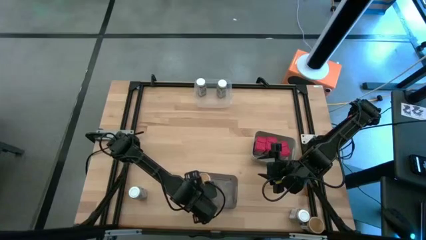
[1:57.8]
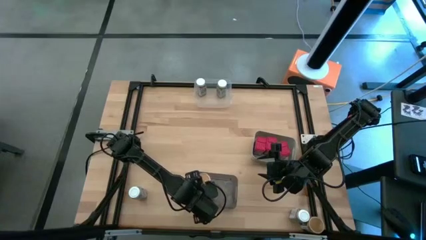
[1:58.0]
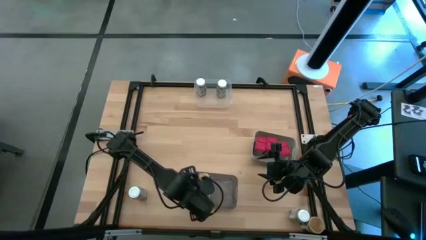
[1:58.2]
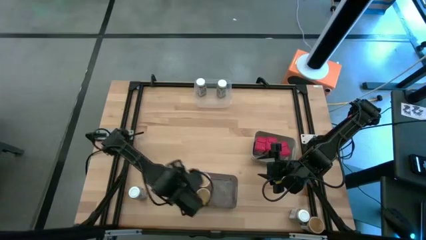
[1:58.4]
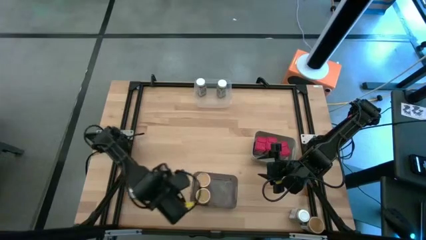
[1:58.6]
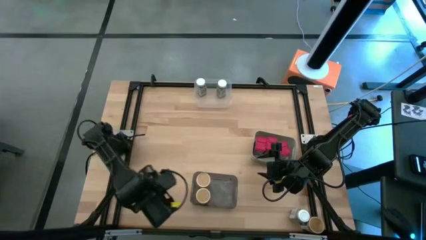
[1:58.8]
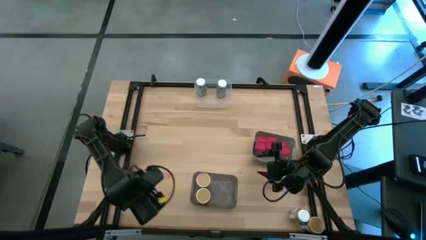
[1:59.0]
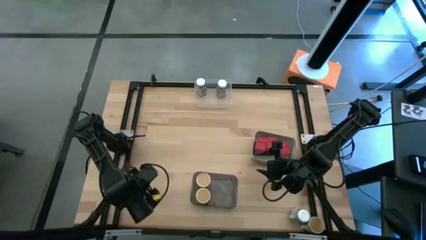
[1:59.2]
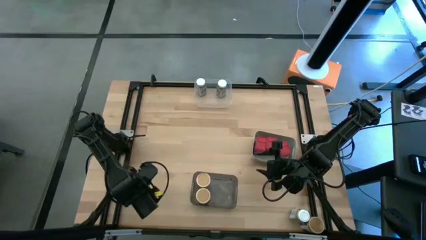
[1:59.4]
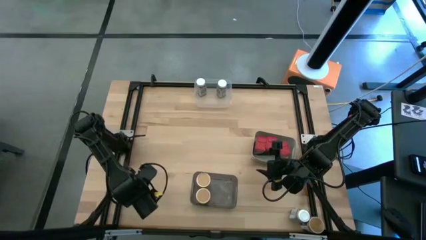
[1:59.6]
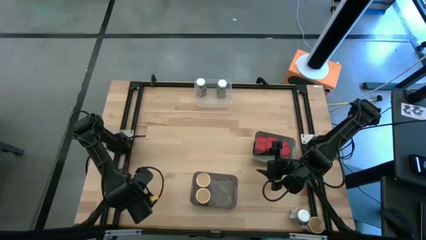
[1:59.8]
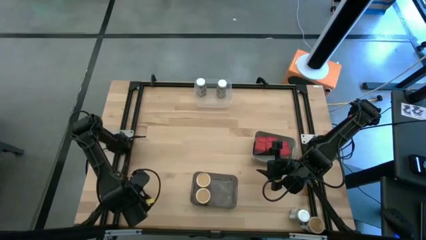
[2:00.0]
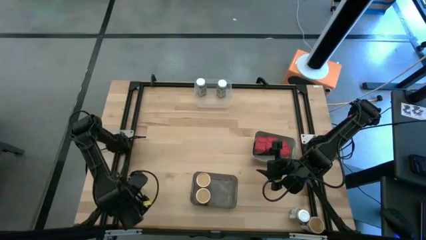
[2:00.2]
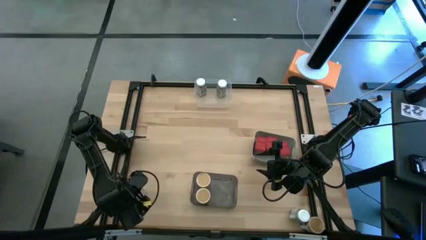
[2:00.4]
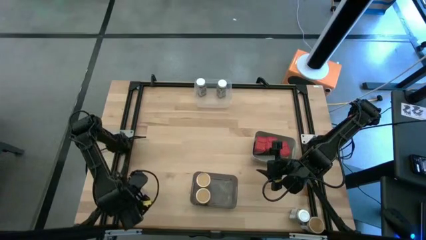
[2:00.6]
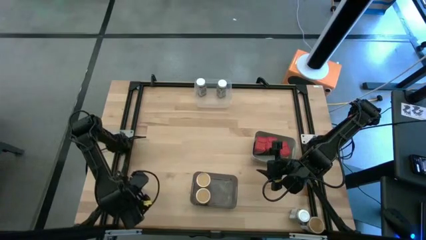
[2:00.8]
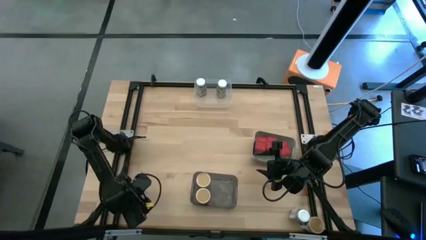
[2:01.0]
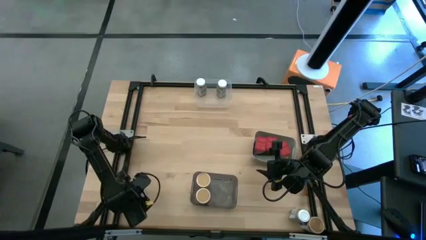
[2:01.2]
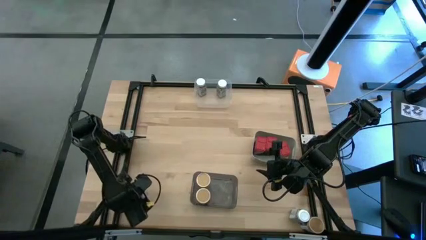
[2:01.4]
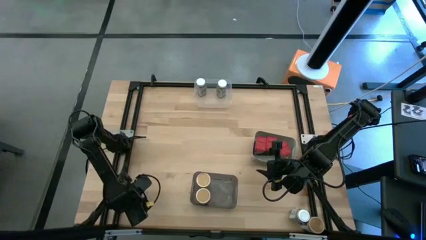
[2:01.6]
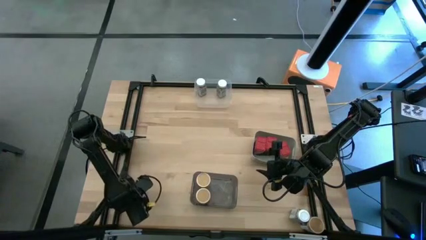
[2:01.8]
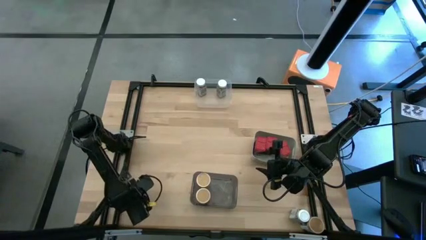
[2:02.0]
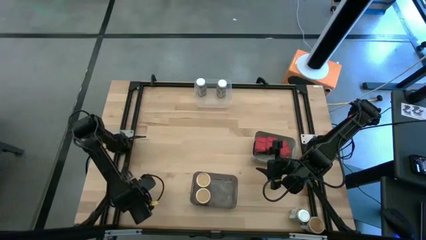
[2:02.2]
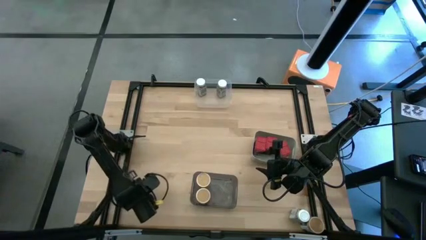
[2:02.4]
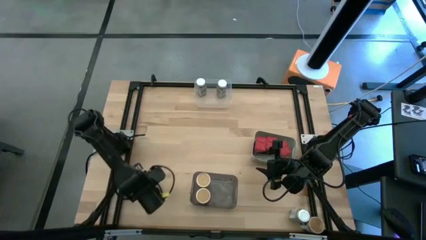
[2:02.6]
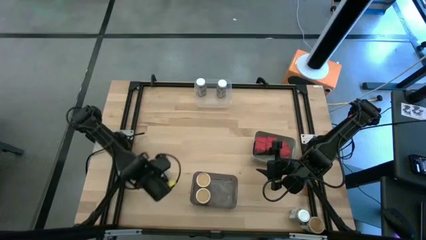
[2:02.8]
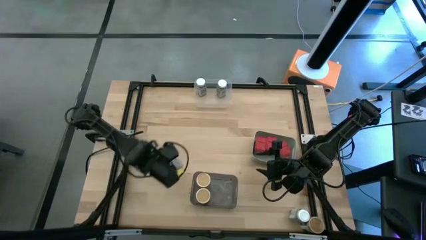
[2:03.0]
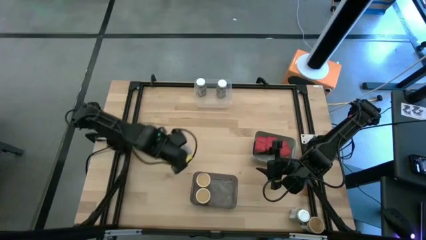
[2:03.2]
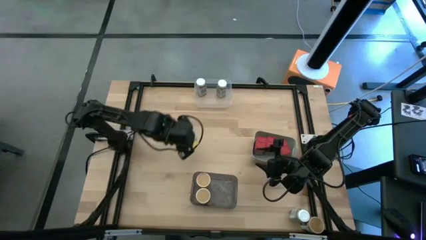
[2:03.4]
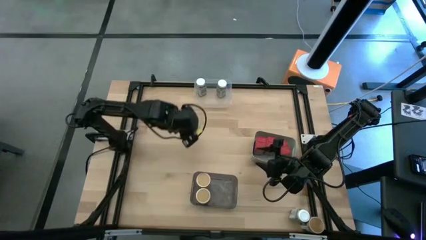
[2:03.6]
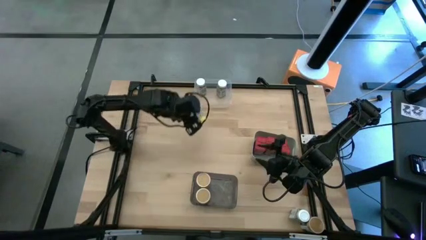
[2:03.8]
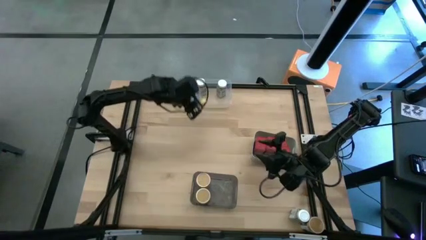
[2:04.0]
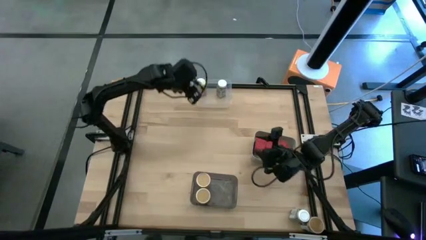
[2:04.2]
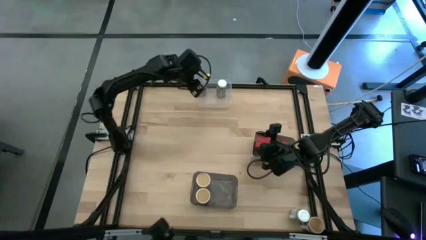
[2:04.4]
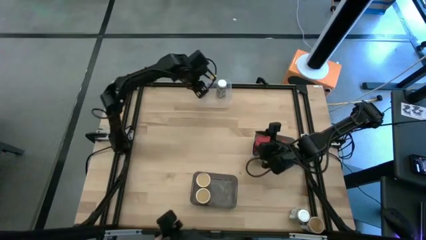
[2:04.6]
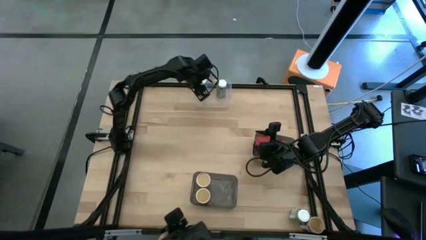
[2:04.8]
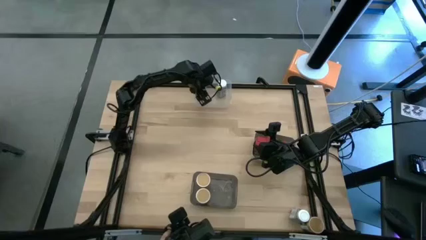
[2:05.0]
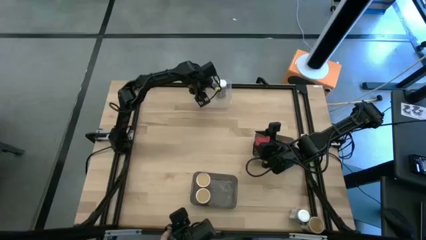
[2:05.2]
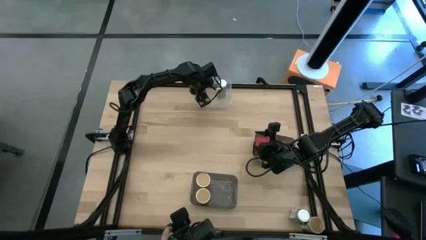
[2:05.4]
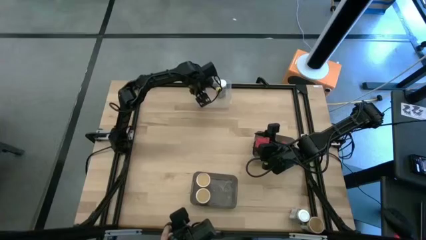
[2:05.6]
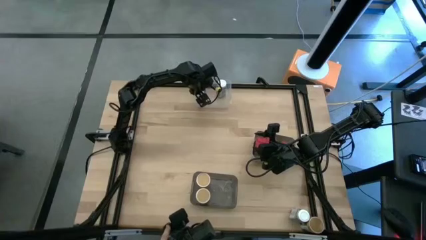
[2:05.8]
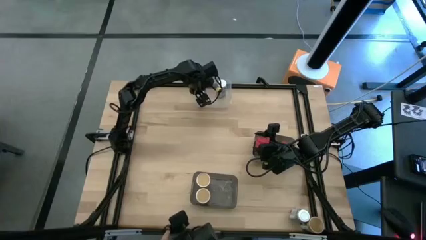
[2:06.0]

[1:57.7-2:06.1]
Task: Sort spices by type
Put the white seasoning bottle into the transparent bin

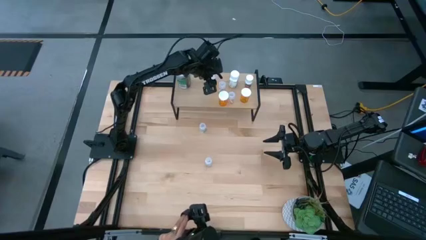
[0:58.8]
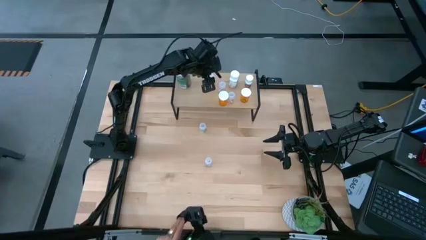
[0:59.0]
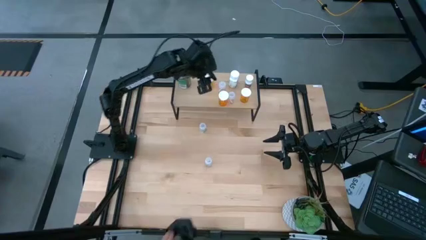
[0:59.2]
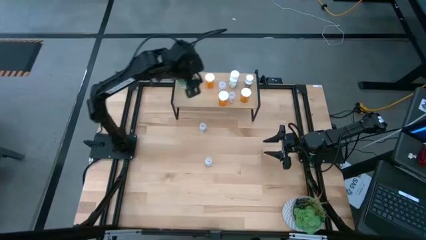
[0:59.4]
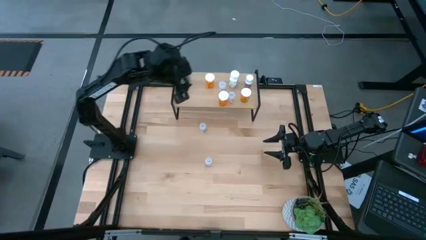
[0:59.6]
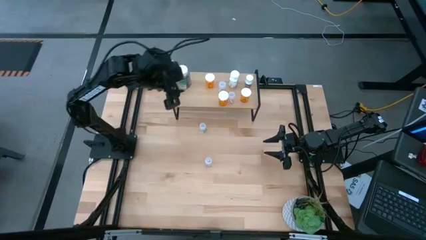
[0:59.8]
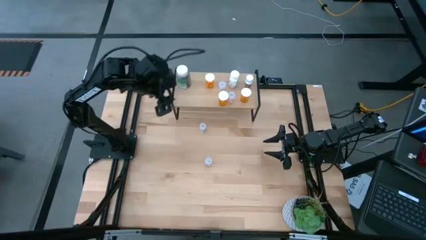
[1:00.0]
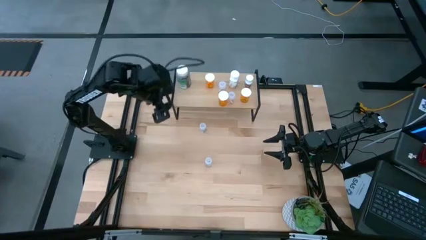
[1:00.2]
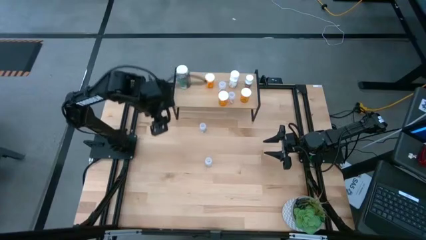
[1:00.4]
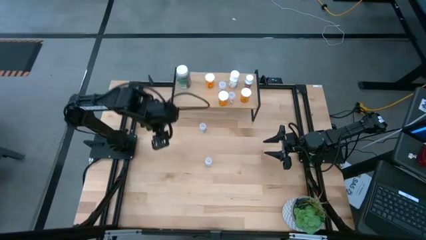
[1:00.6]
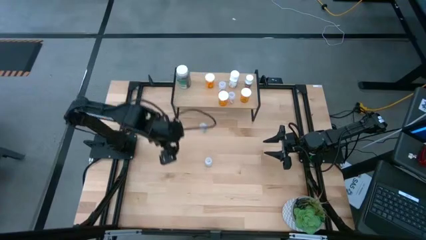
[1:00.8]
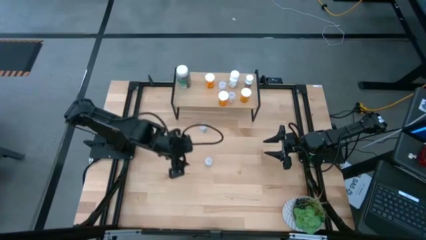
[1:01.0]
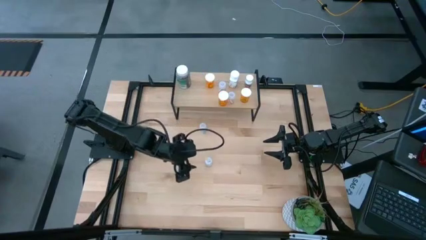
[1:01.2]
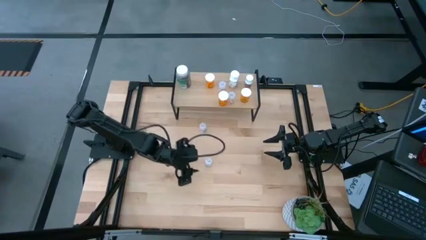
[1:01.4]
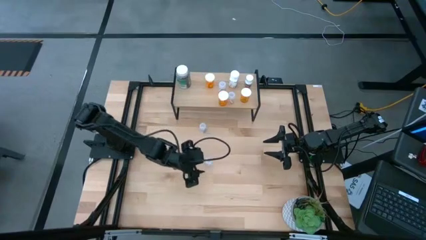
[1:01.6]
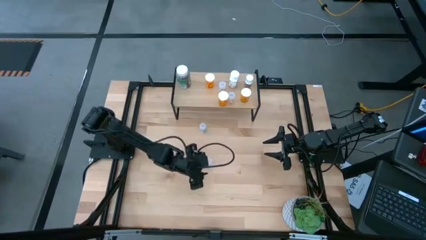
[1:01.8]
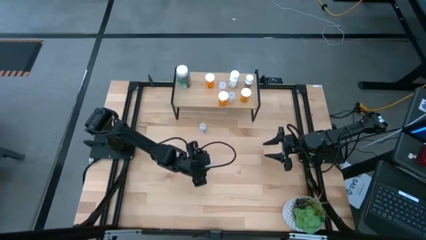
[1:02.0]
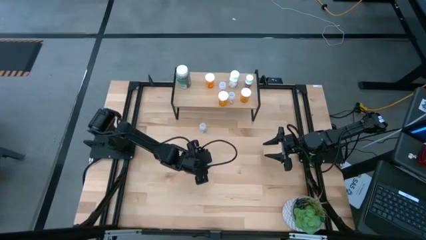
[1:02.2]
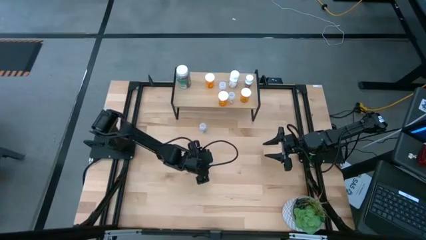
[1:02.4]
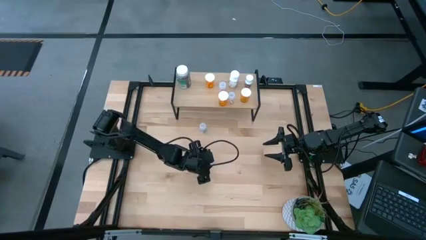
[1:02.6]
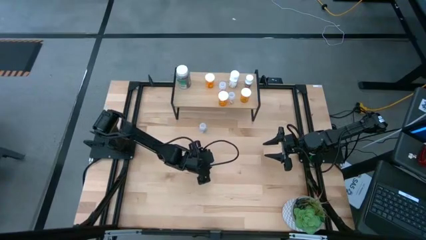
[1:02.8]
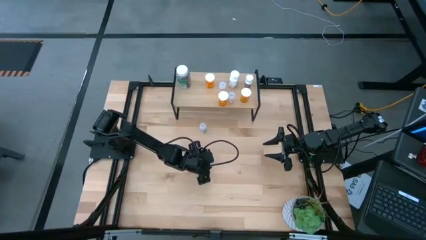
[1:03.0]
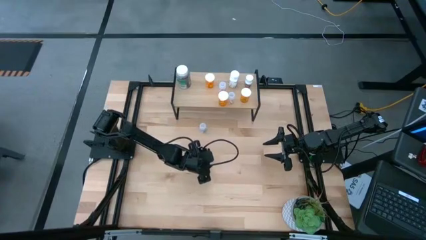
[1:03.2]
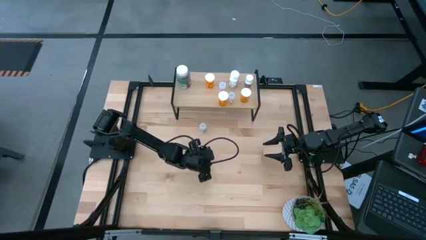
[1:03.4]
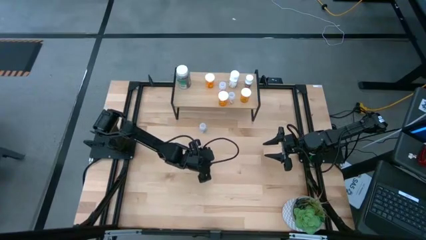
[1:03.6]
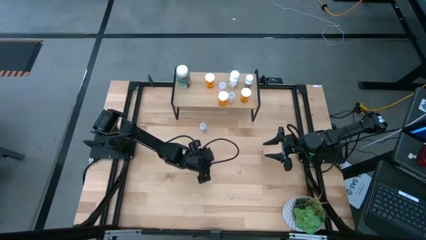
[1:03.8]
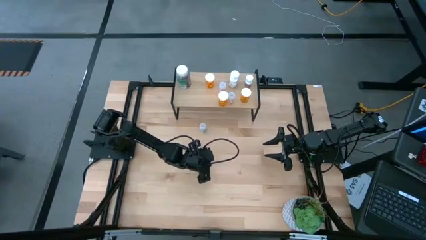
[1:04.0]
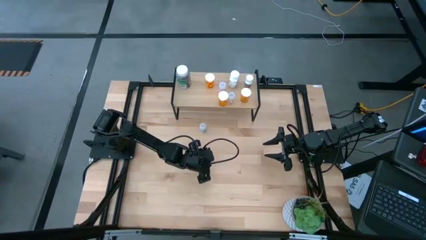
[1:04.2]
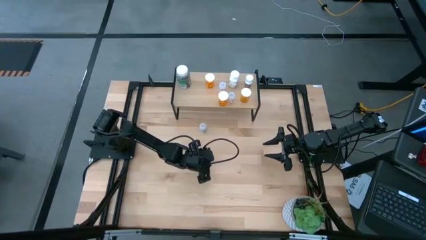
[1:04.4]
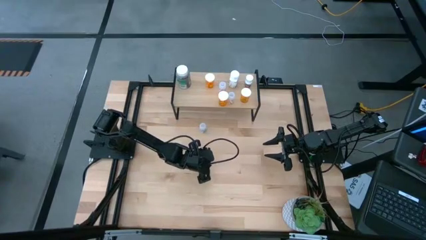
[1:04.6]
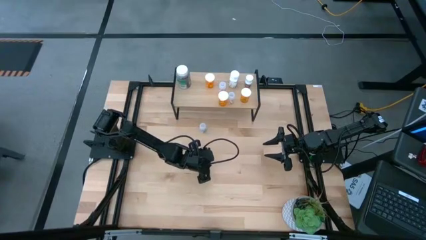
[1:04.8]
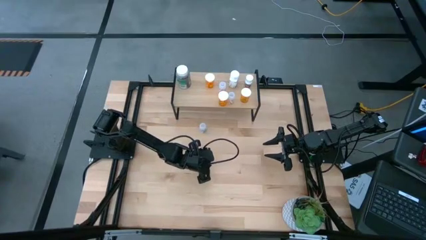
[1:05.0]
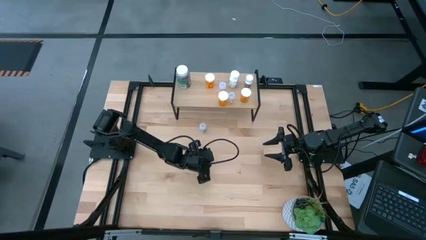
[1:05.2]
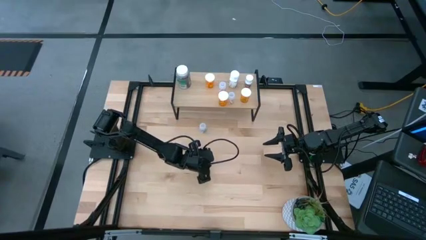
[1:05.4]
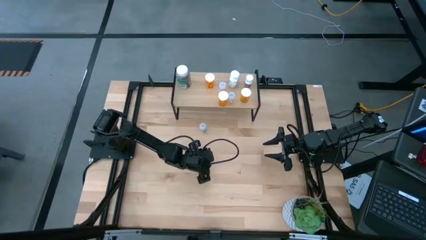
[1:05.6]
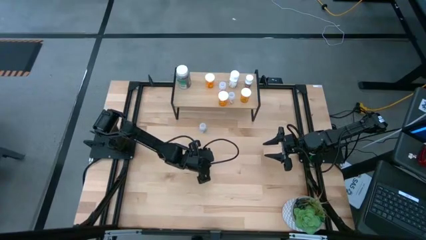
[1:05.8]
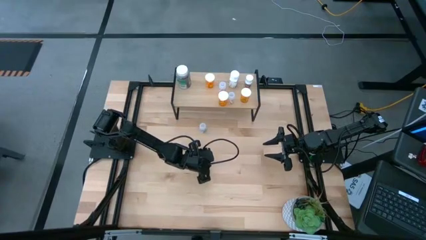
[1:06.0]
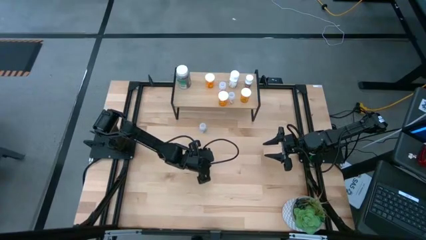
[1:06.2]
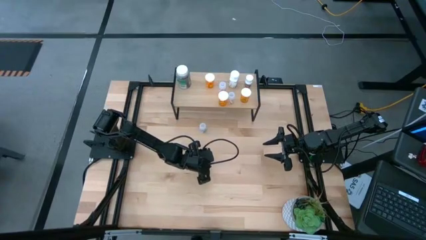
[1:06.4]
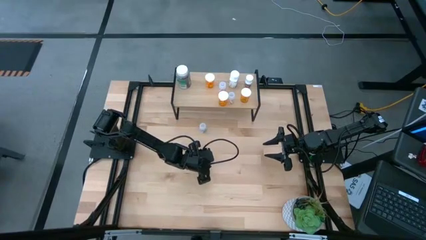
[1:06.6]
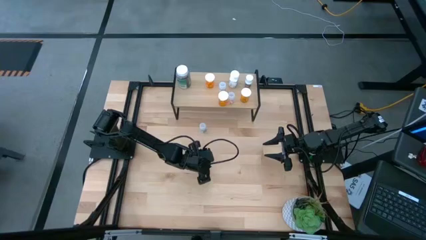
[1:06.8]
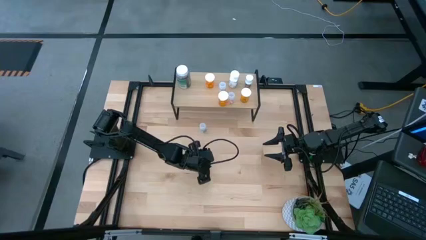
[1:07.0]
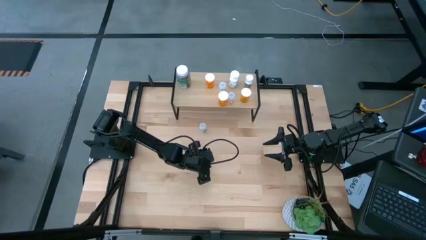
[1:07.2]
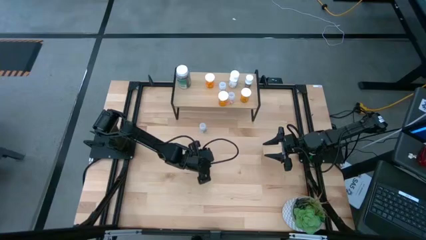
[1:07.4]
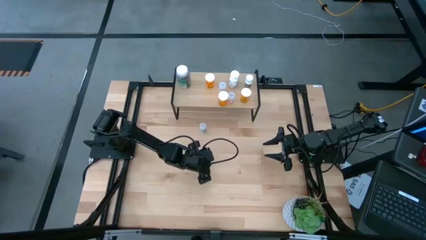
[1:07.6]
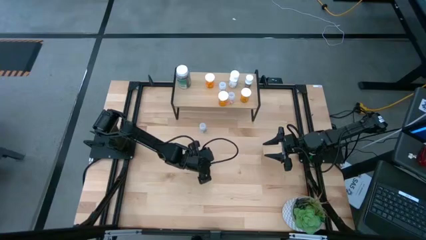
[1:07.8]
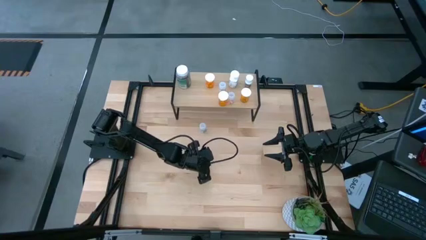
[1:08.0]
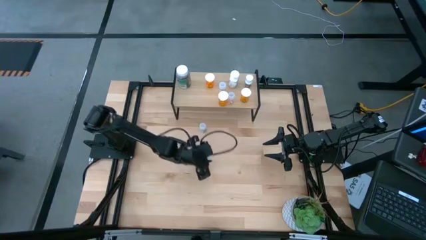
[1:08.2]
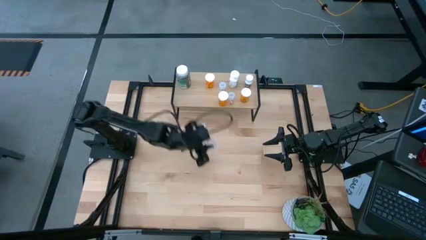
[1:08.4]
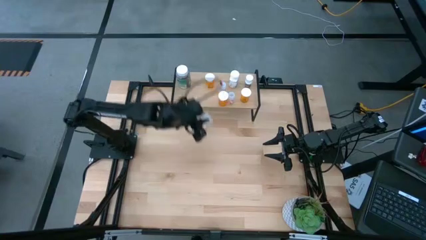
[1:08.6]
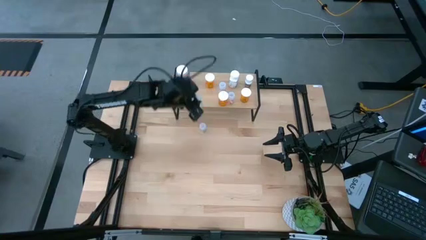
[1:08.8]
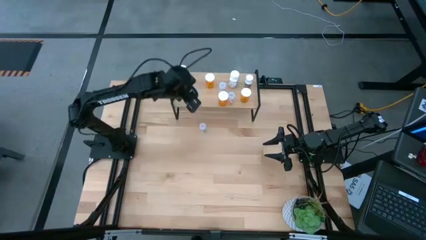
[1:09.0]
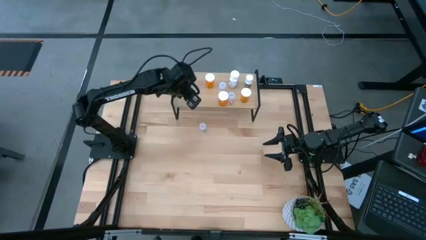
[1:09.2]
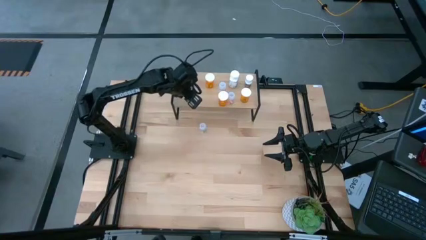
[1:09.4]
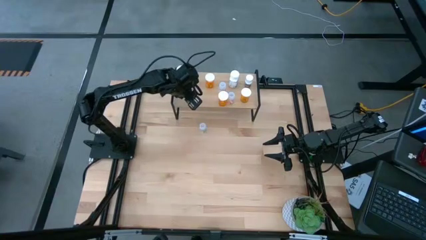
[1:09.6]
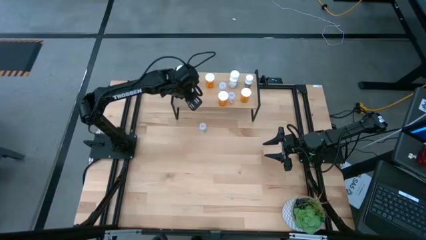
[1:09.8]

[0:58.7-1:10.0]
Task: Pick and place medicine bottles onto shelf by color
Put the bottom transparent pill bottle on the shelf
